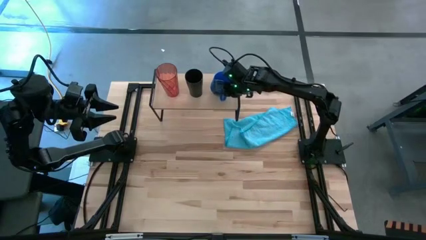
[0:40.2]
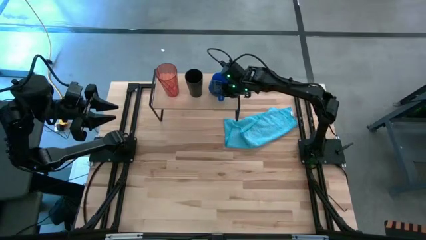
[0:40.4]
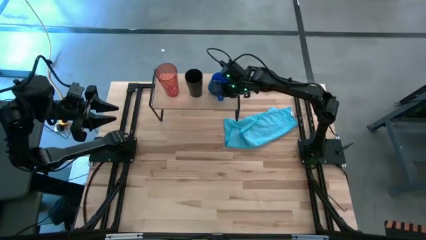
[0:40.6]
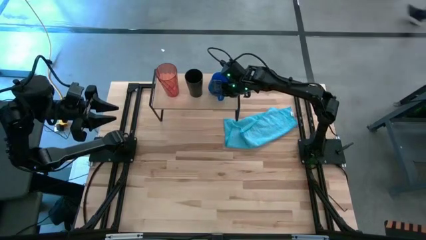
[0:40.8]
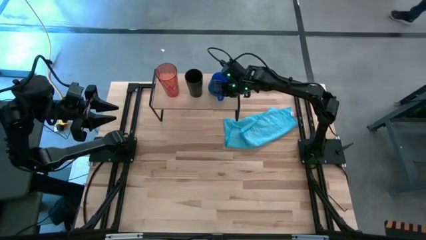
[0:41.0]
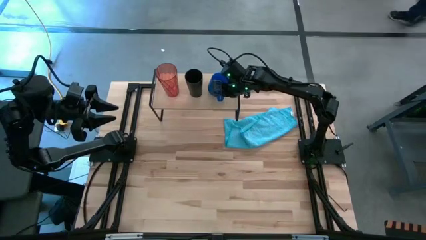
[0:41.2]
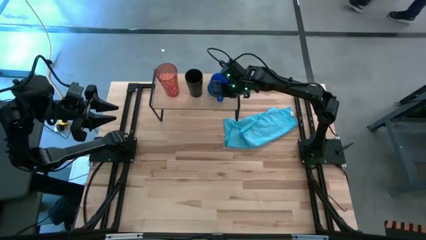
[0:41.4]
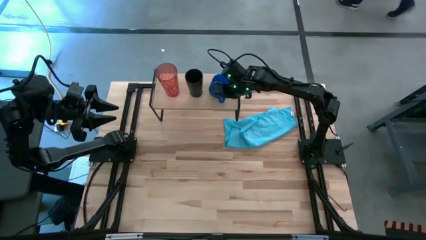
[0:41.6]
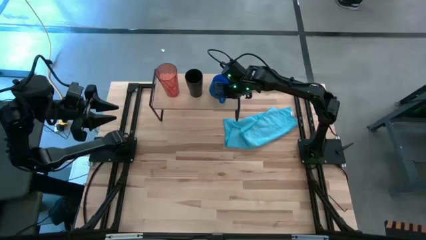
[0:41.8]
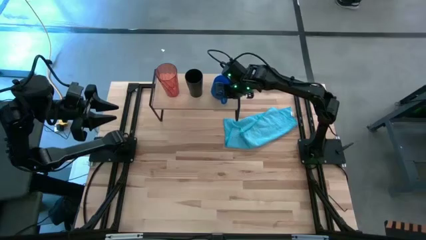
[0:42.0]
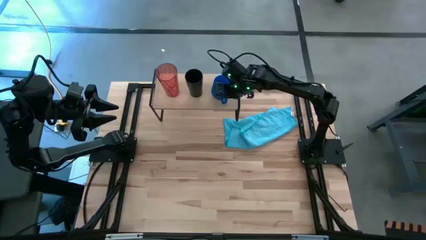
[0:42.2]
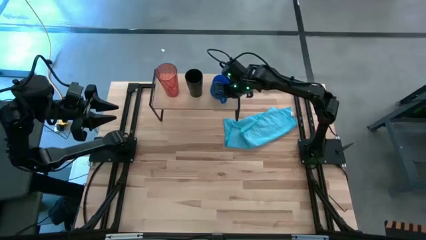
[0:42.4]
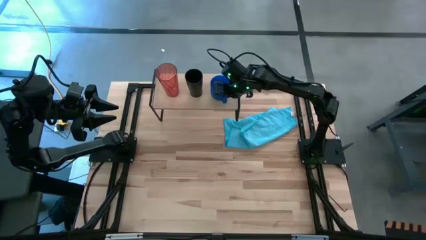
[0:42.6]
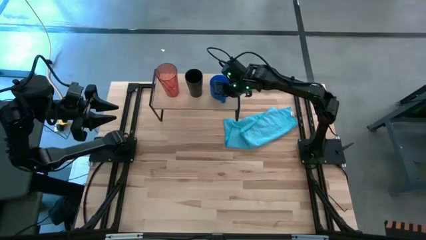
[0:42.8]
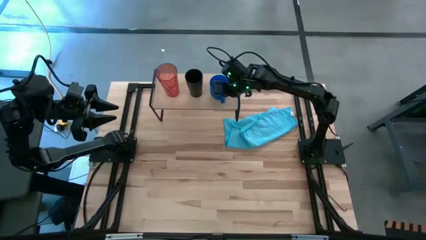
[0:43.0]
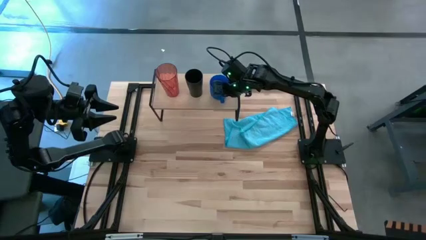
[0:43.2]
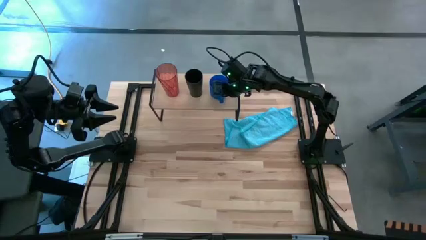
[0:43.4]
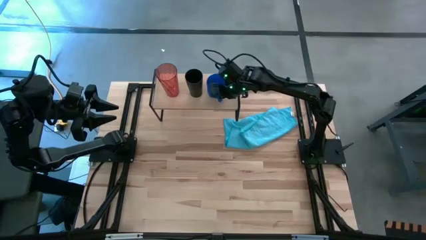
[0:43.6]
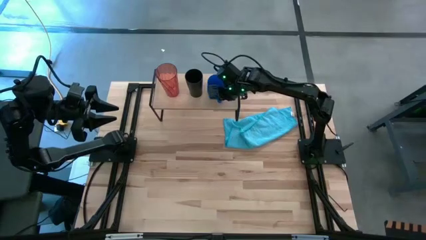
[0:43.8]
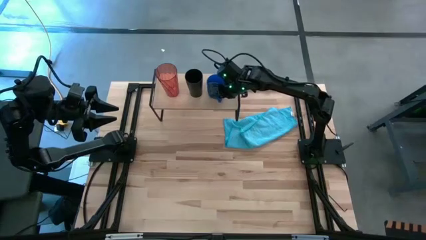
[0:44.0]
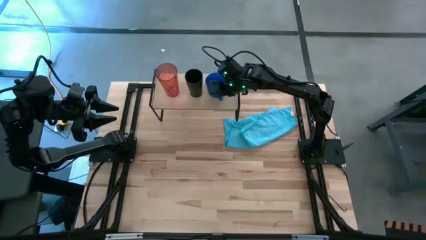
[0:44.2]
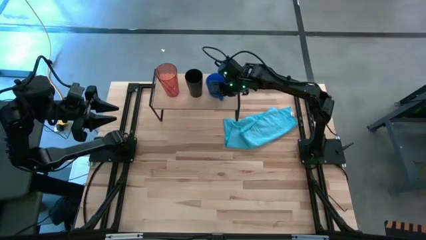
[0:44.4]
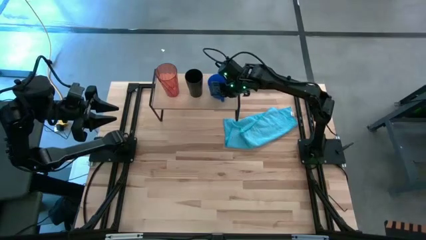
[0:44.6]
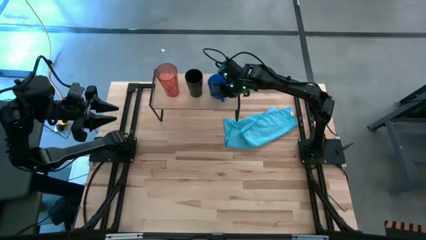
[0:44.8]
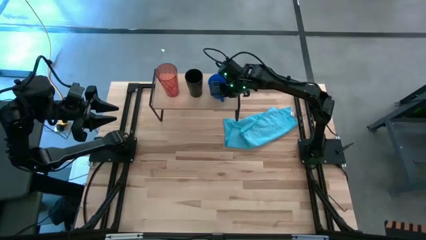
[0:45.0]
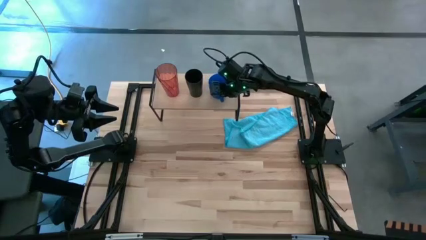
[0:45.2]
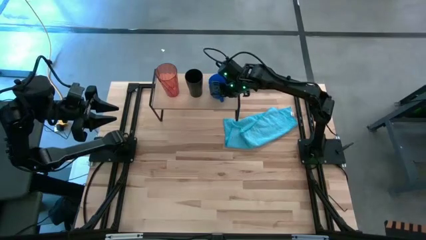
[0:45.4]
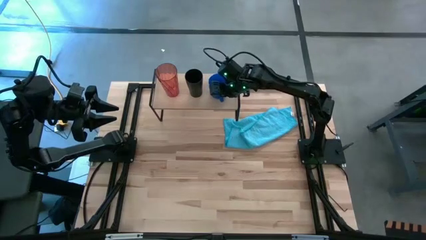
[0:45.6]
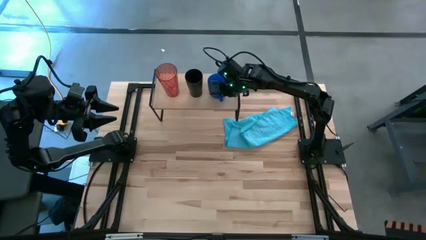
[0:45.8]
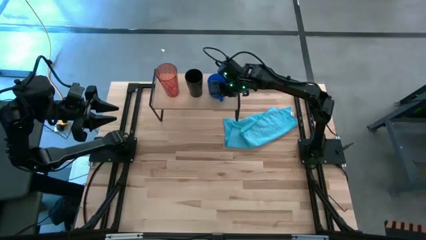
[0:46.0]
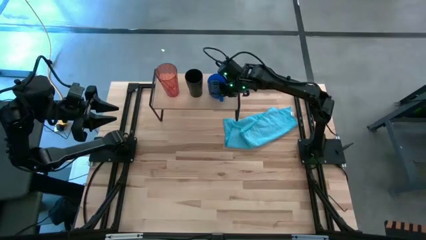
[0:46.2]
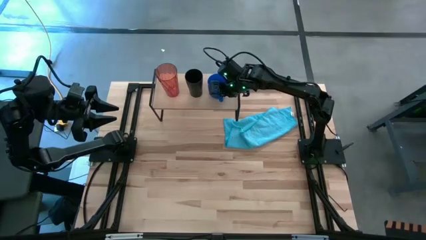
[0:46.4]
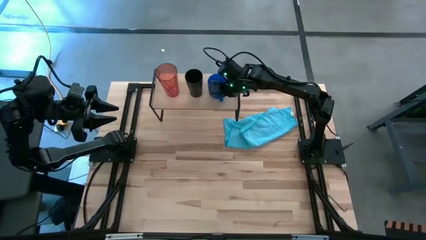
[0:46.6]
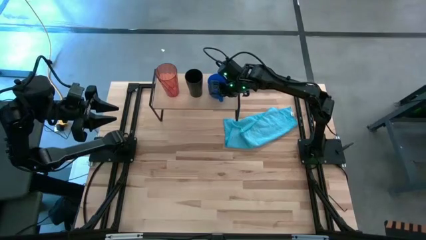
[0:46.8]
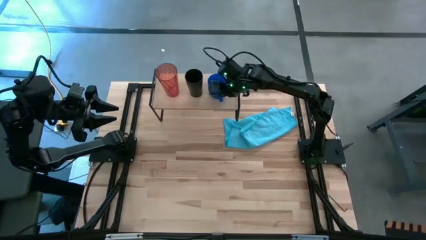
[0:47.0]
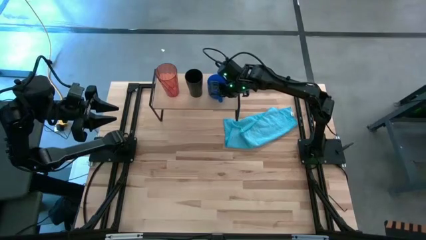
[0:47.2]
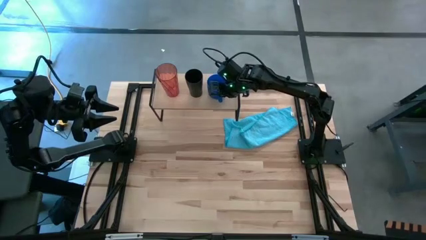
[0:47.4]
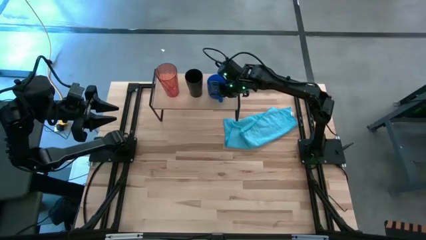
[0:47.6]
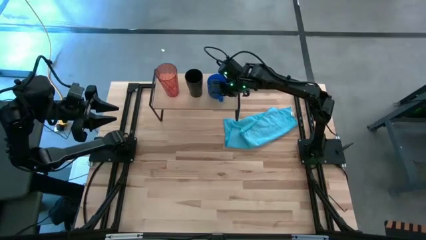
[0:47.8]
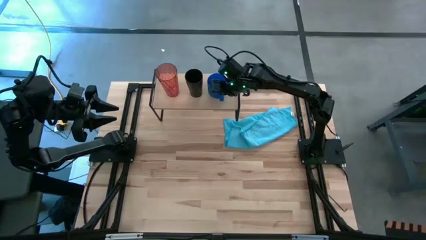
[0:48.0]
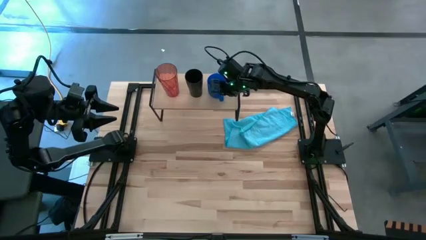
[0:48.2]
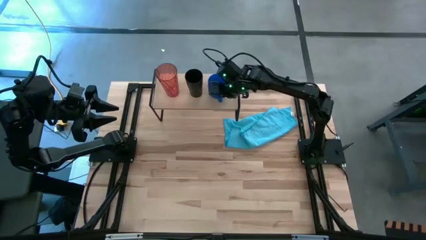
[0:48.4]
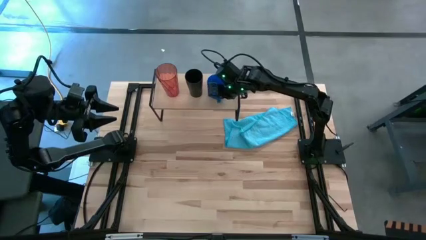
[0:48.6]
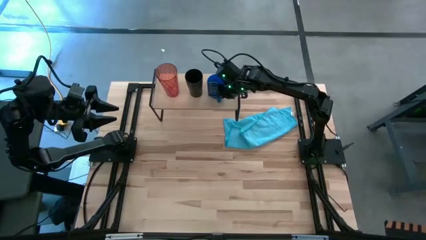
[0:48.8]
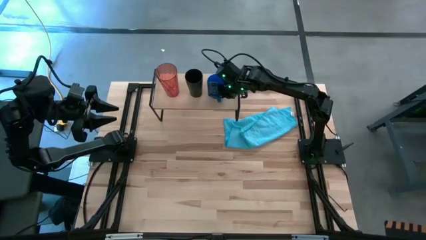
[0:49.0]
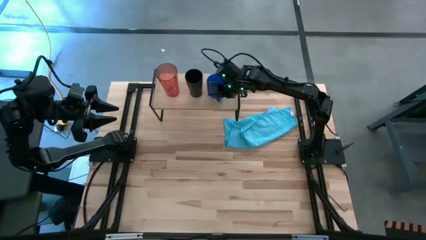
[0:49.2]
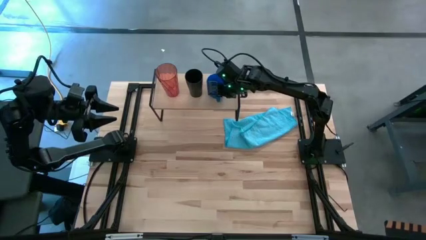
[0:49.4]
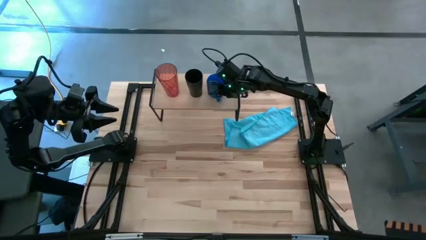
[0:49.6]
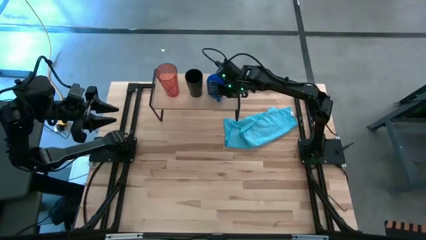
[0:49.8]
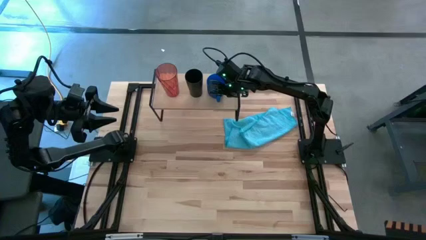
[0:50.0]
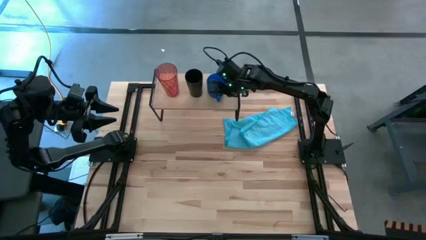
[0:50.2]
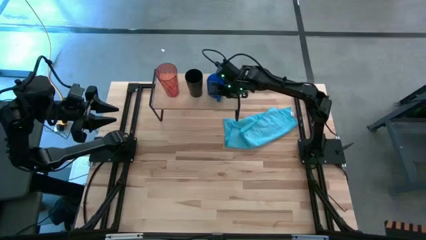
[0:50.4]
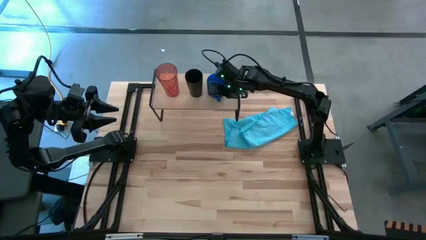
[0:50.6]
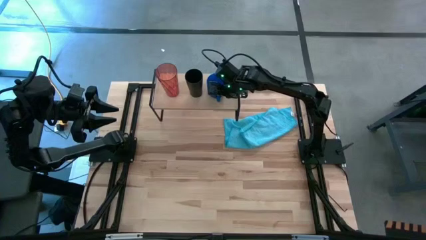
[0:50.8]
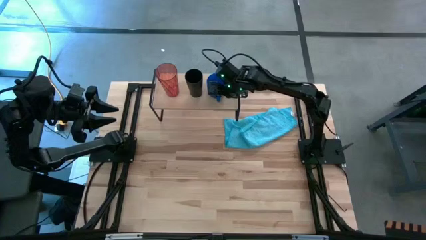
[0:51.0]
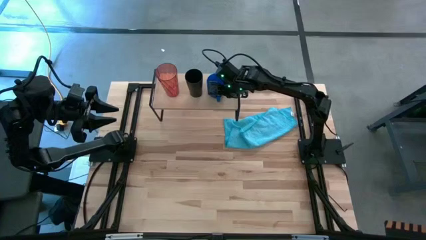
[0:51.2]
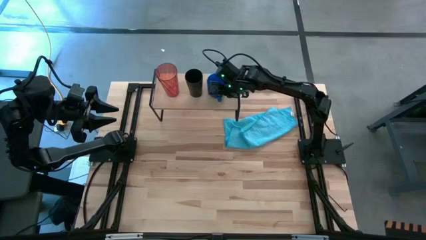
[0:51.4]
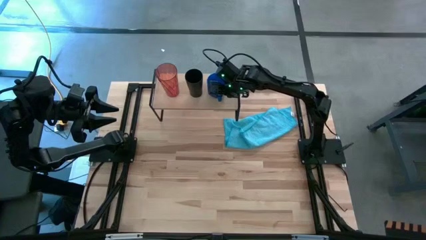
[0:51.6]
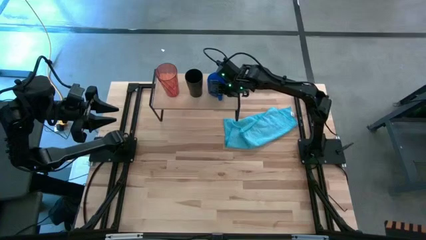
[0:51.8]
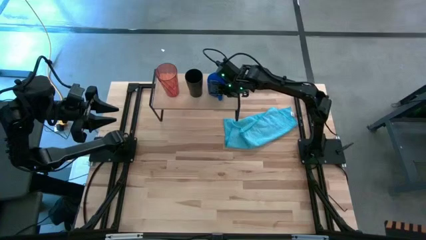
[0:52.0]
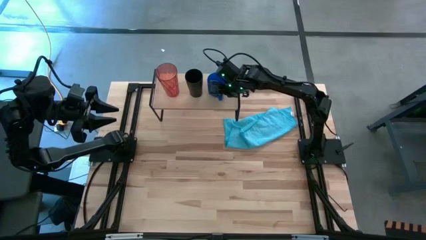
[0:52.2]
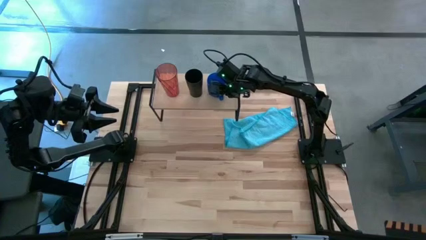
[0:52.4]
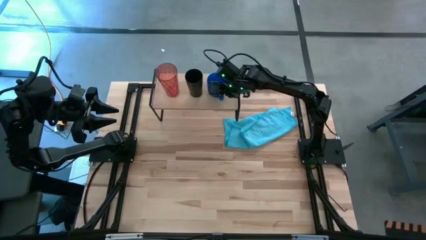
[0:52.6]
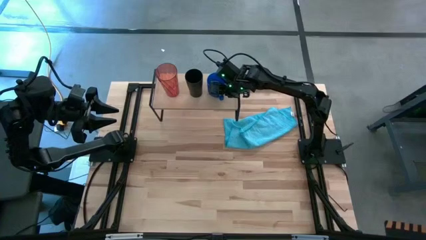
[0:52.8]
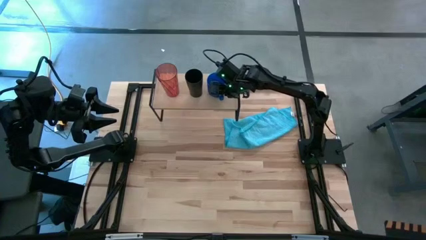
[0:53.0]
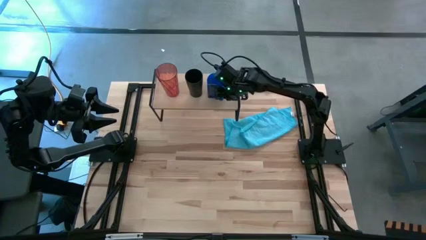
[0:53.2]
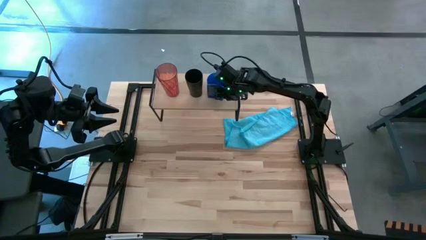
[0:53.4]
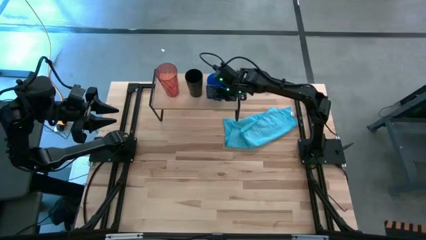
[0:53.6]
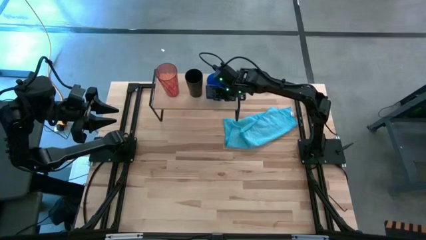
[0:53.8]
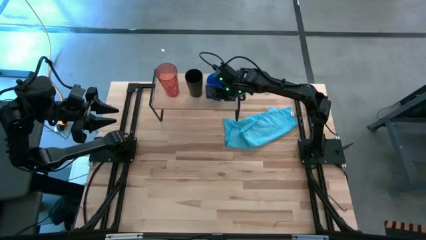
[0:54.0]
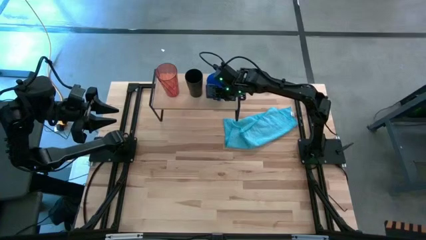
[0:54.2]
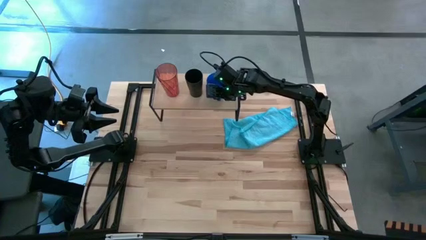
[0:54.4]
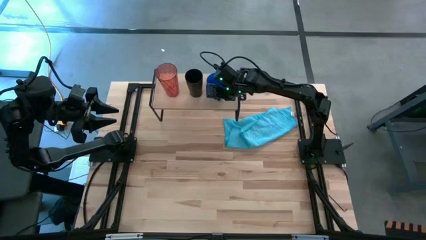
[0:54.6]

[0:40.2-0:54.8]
Task: Stack small to large cups/mugs on shelf
Put the blue mug on the shelf
